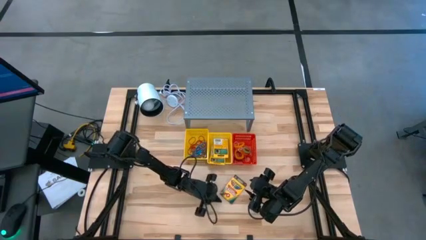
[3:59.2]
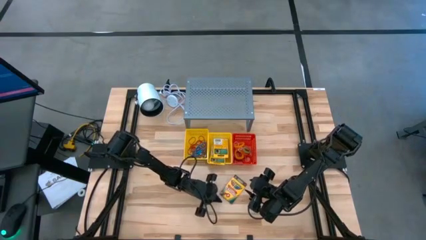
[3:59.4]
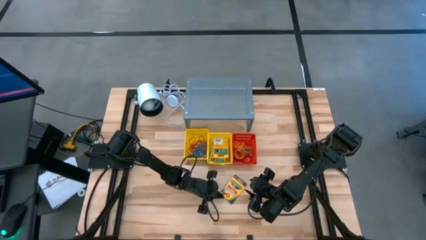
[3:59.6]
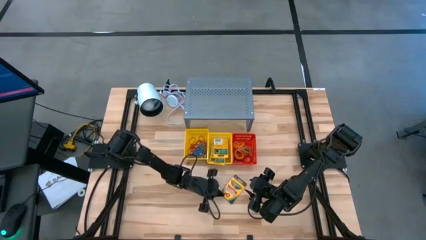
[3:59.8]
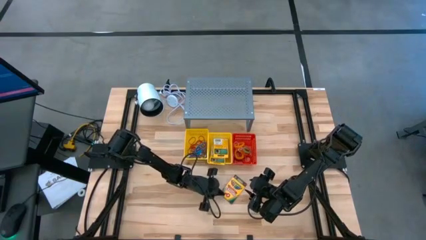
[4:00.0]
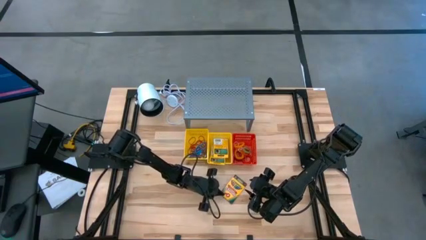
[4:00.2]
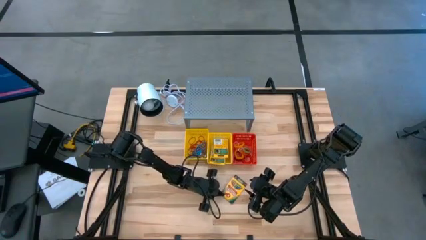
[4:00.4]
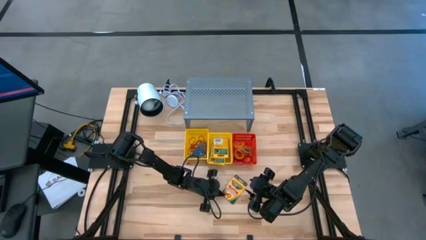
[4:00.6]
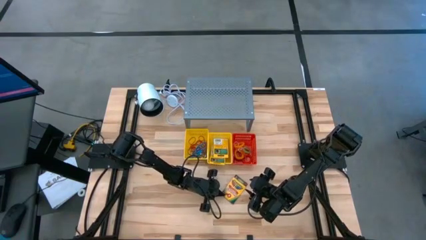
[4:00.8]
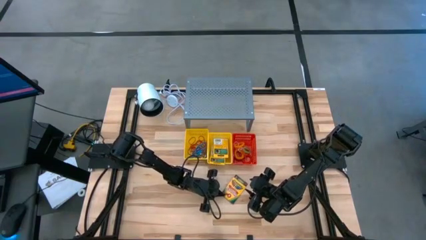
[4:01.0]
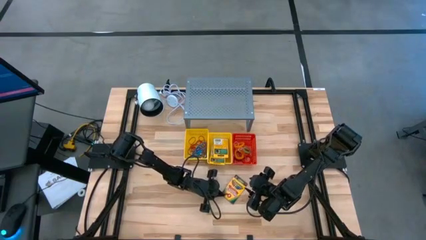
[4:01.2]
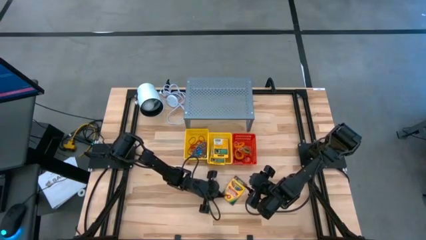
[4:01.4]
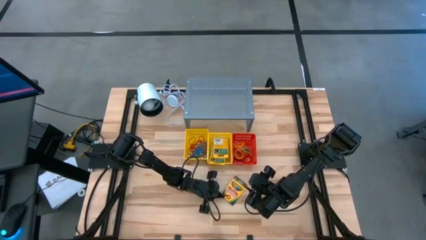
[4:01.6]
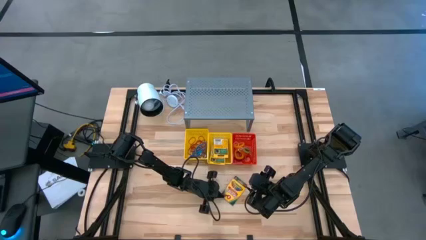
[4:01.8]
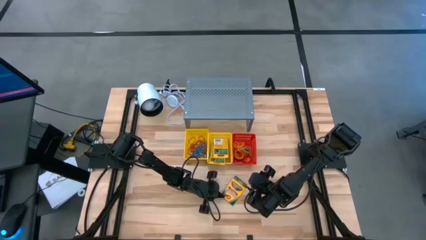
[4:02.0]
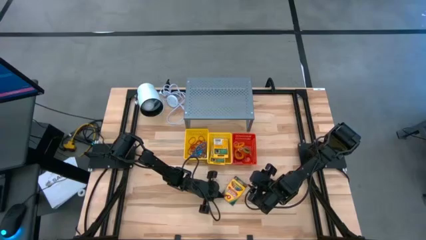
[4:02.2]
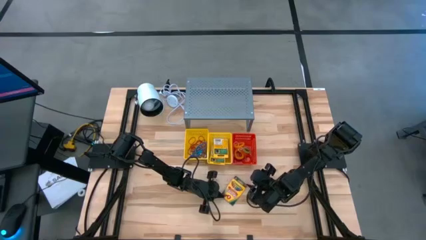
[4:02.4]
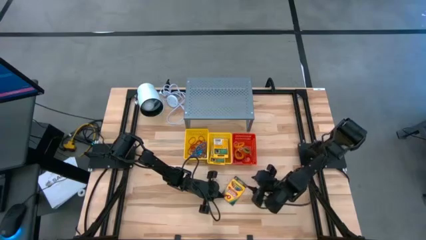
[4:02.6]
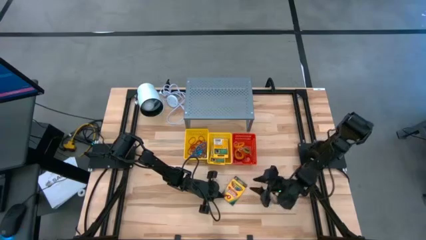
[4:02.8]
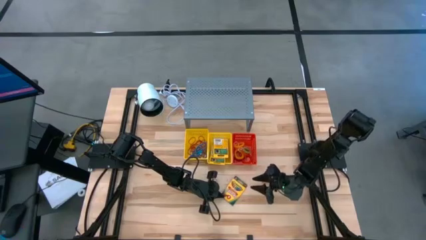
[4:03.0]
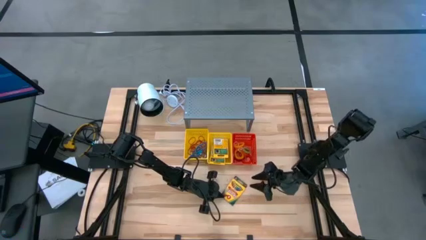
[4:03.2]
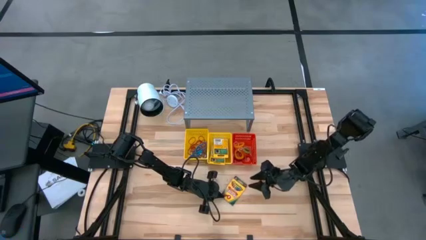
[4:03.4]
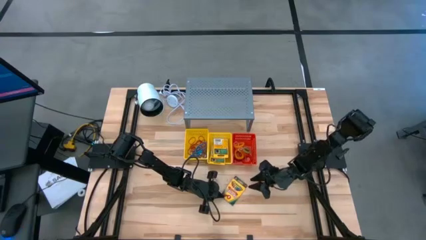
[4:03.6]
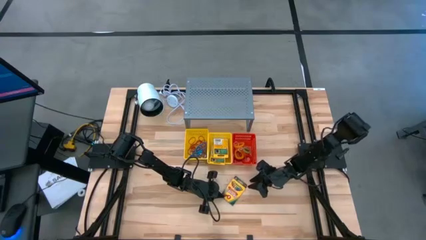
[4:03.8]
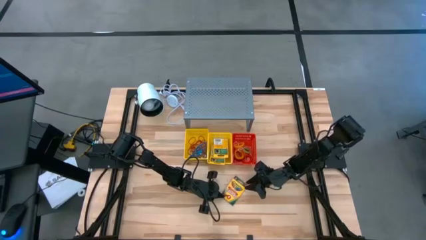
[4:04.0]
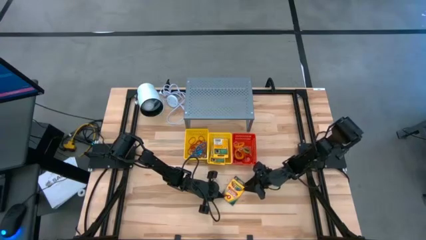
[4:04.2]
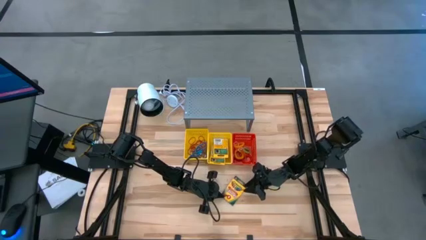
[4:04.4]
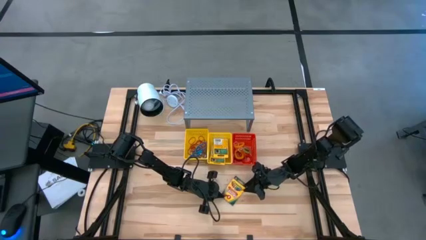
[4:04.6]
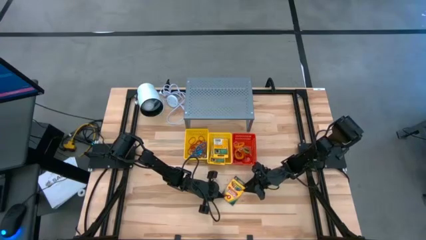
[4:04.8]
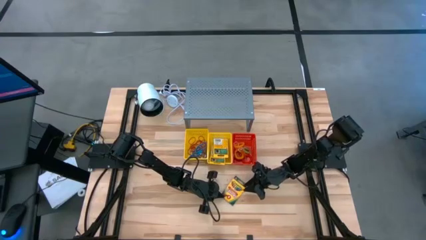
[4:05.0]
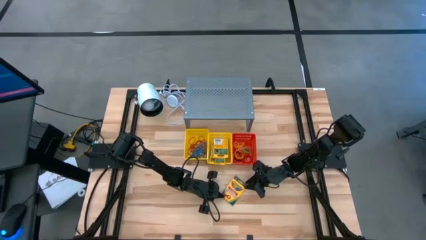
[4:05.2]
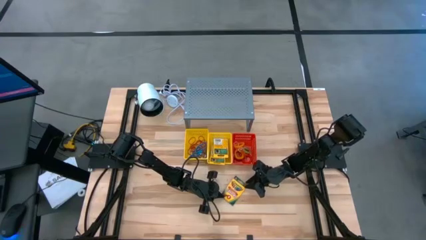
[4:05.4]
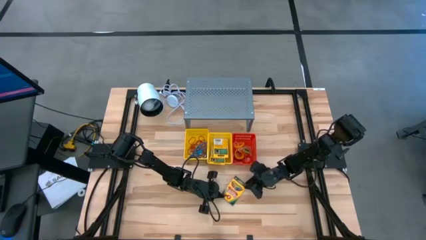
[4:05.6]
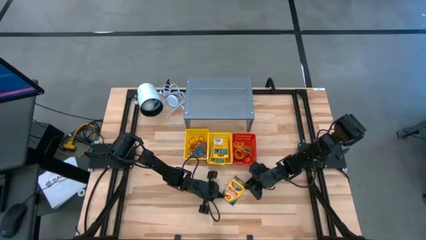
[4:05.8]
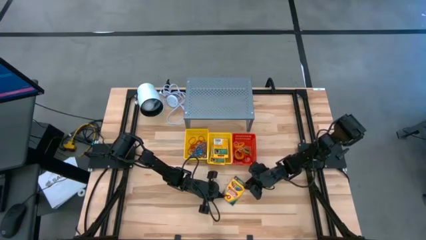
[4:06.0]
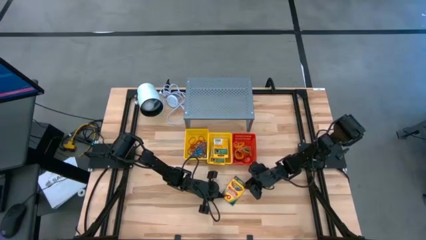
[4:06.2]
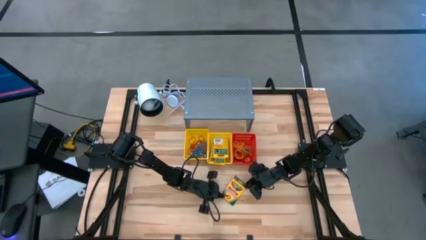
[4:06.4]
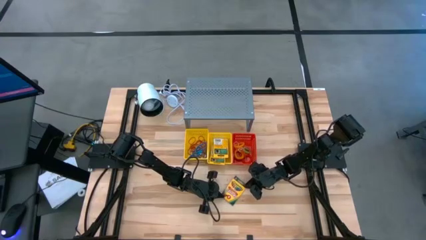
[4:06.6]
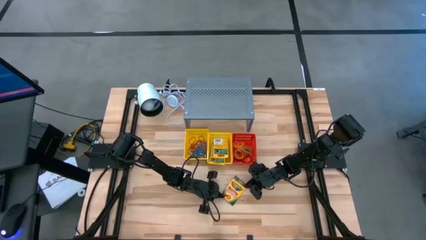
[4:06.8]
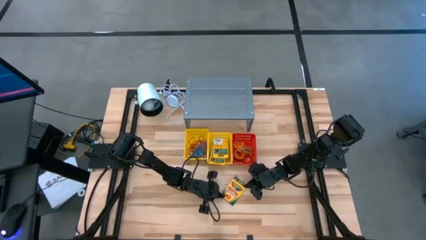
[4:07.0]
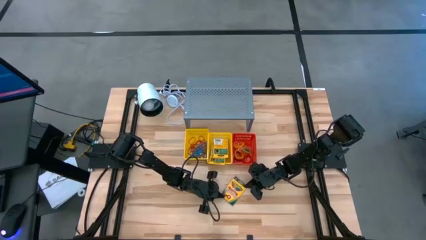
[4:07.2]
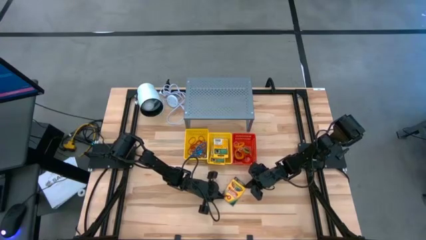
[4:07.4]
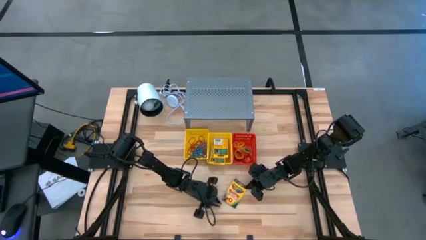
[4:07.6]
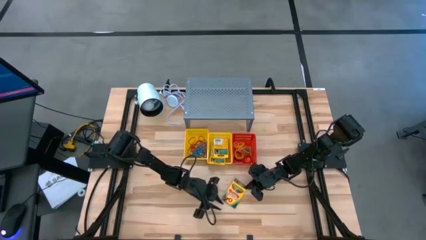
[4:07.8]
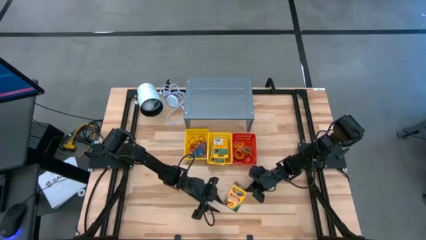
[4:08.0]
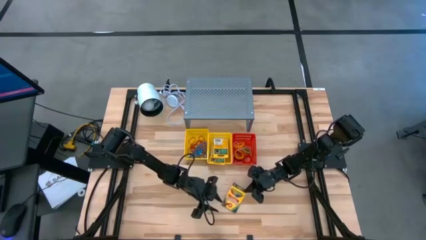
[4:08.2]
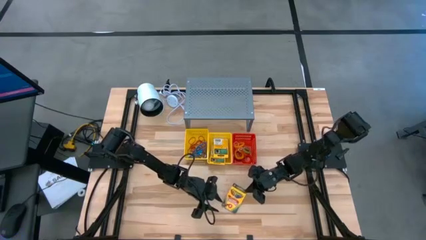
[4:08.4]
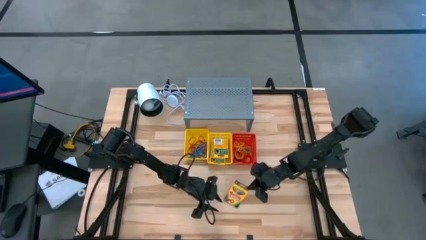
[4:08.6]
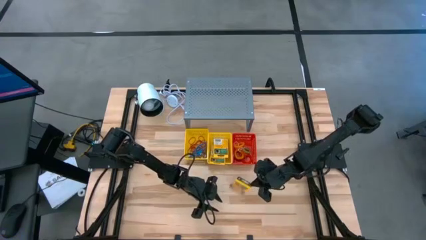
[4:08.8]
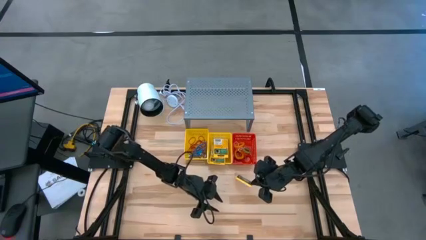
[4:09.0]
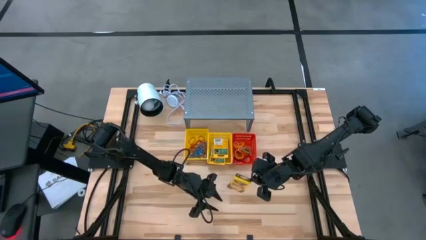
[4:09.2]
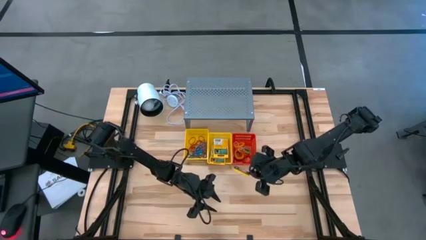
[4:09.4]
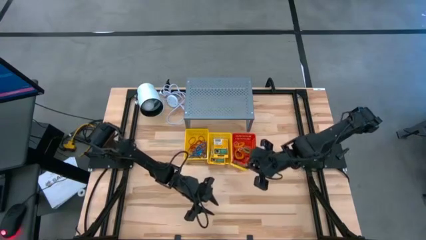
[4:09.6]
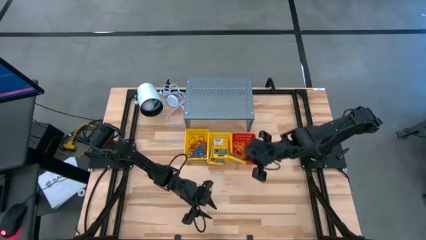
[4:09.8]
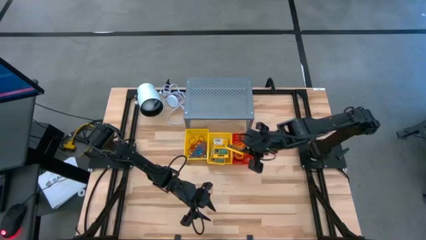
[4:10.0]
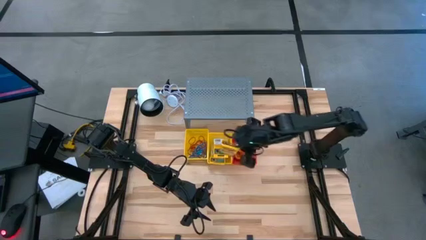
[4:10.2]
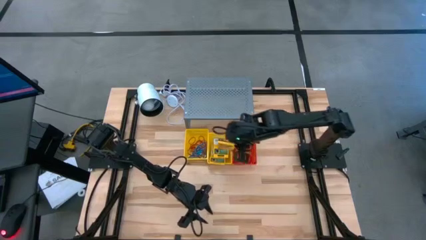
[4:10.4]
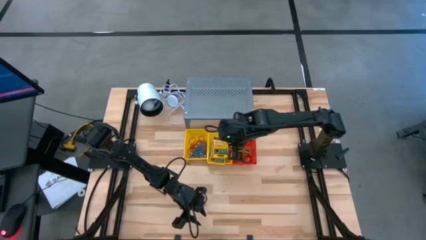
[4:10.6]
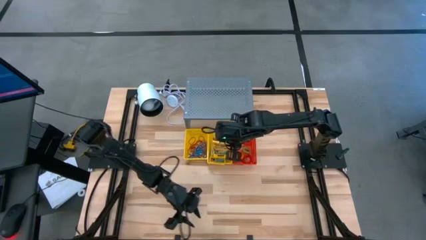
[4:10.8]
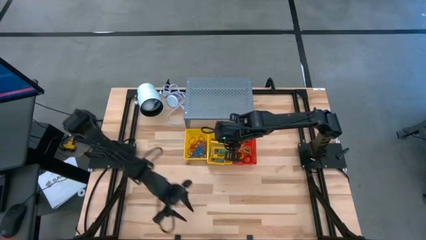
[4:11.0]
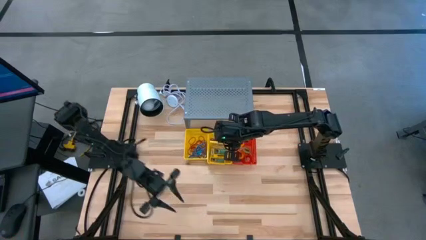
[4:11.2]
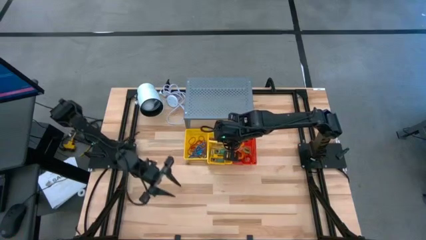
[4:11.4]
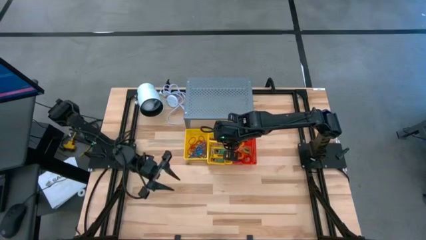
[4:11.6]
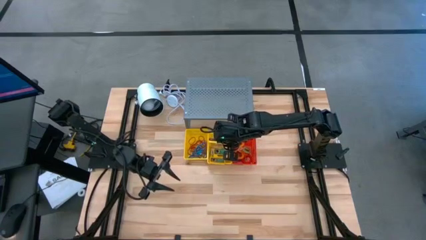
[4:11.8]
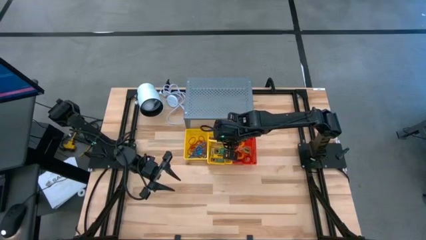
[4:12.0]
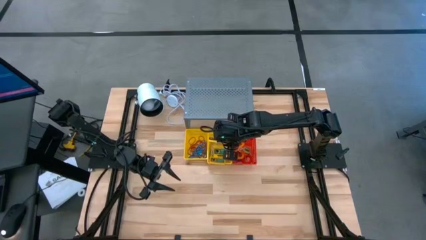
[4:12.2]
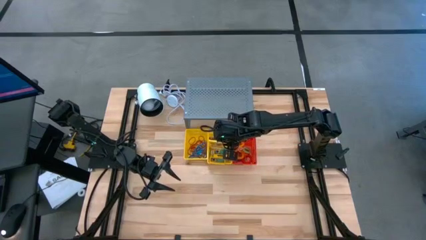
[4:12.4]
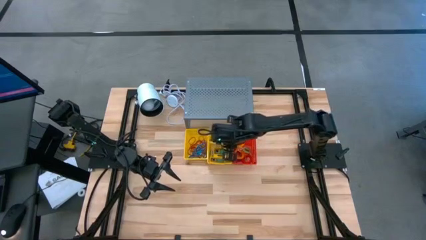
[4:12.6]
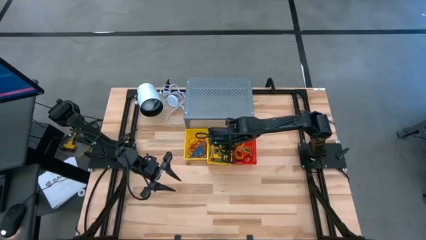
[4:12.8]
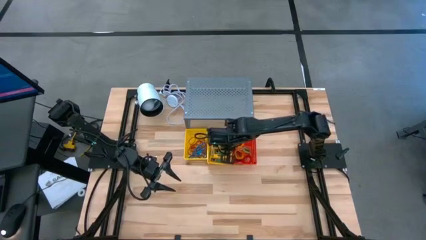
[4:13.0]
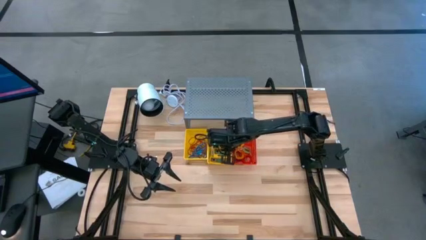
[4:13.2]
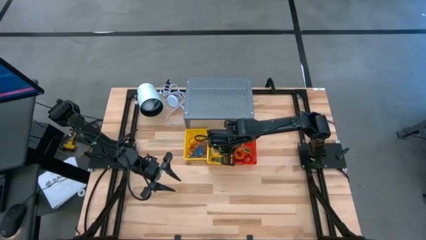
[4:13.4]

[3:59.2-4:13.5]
Task: Pick & Place Office Desk Supplies
Put the crayon box into the right yellow basket

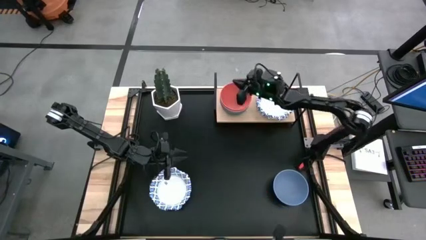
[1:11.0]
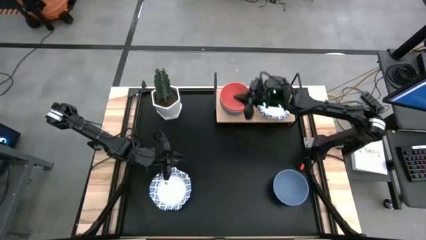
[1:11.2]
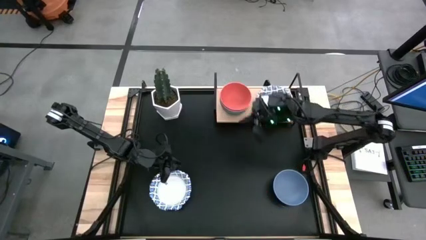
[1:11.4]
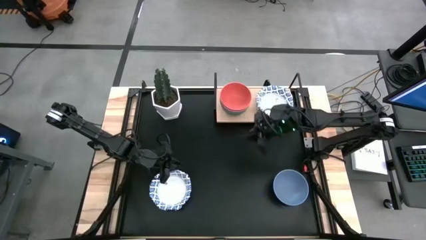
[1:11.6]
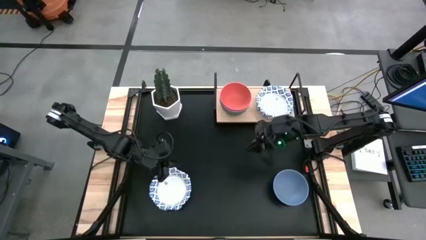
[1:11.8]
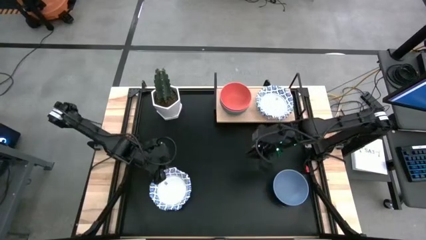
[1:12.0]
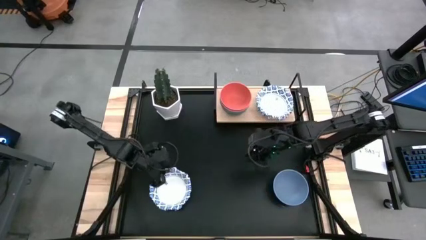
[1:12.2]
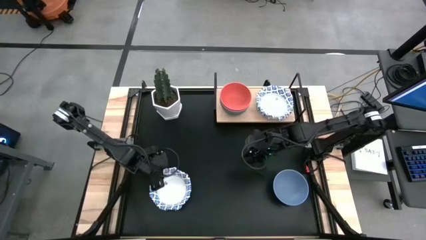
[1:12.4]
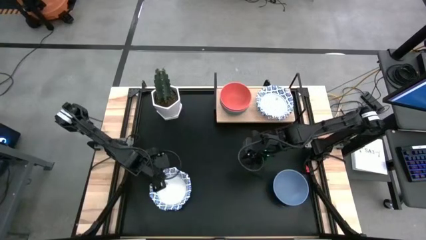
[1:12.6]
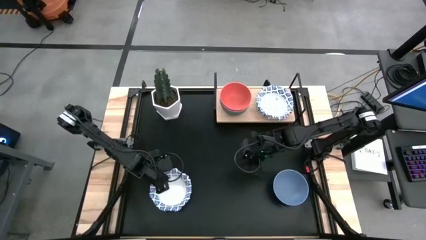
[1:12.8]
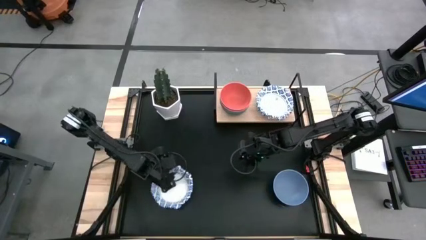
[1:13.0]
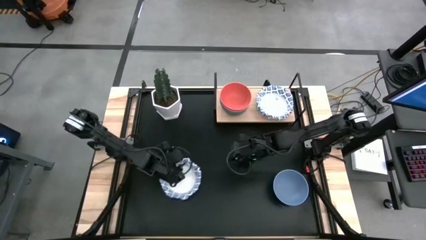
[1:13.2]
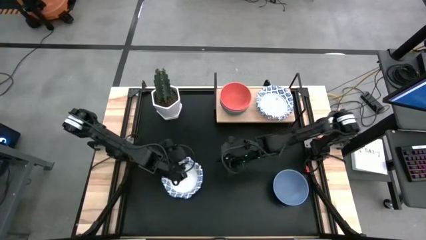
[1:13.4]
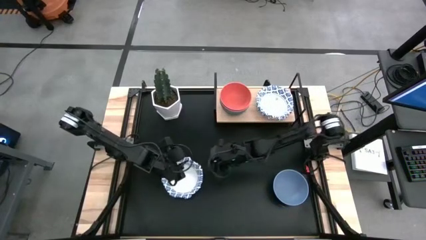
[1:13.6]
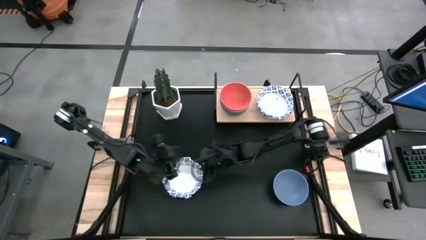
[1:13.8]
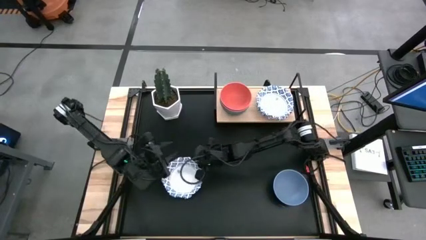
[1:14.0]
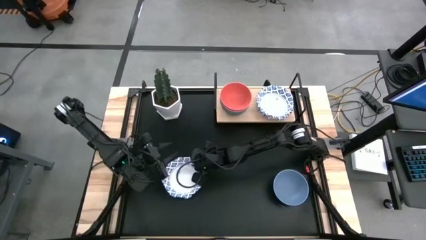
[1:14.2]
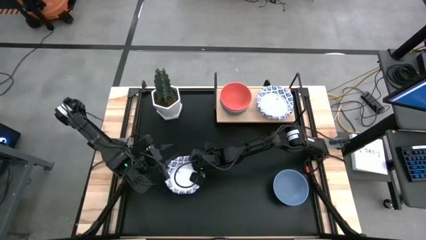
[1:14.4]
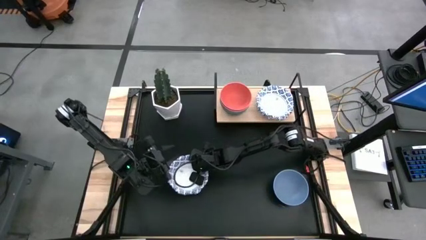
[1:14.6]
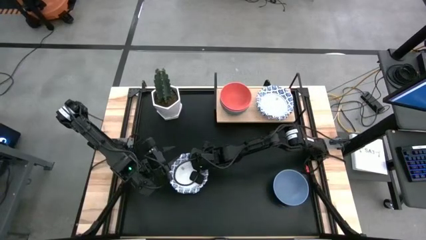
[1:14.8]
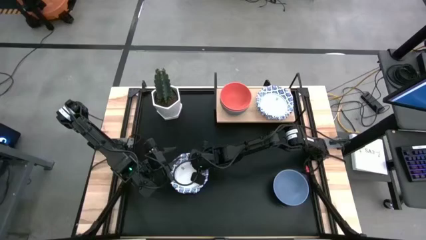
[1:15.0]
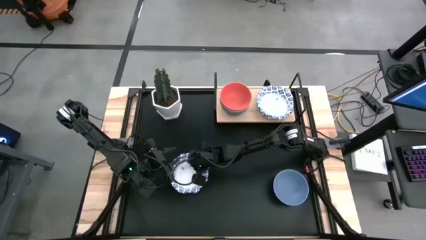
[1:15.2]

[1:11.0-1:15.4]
Task: Place and stack bowls onto a shelf
Stack the blue patterned bowl on top of the blue patterned bowl on the shelf
